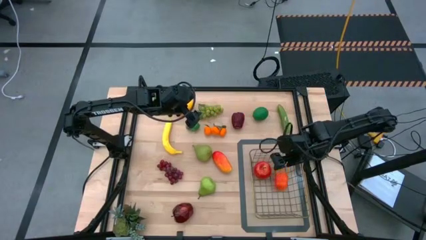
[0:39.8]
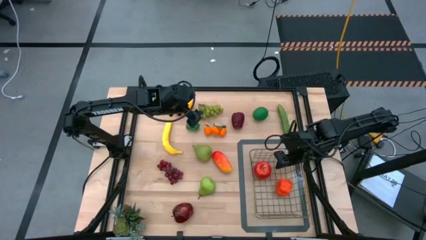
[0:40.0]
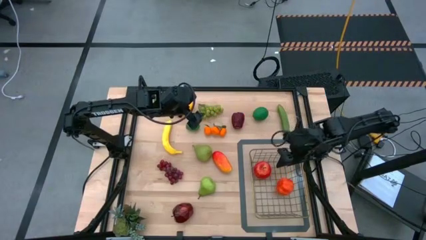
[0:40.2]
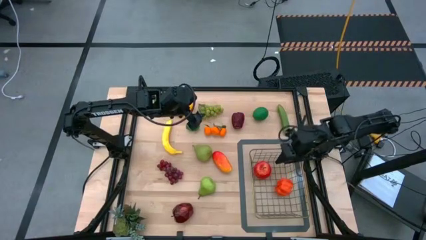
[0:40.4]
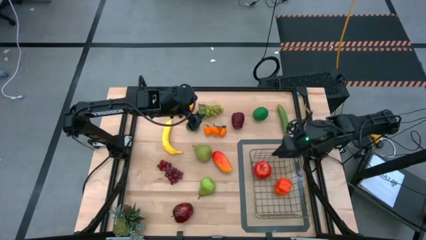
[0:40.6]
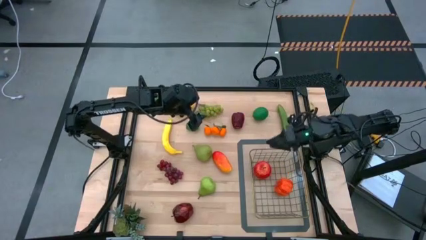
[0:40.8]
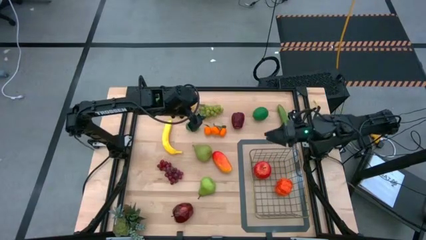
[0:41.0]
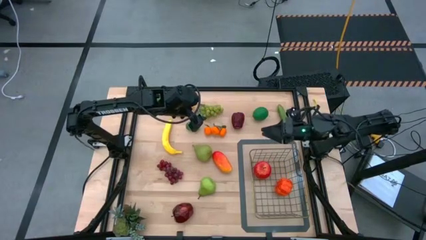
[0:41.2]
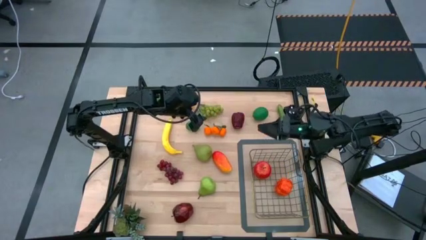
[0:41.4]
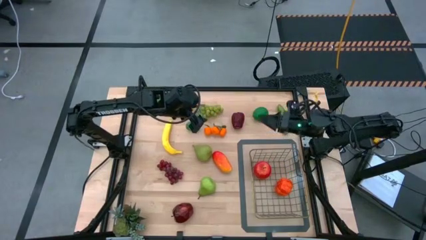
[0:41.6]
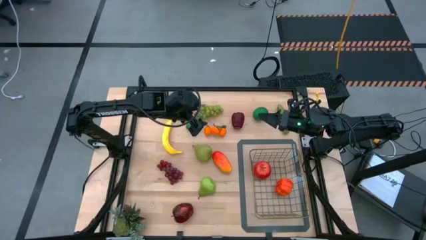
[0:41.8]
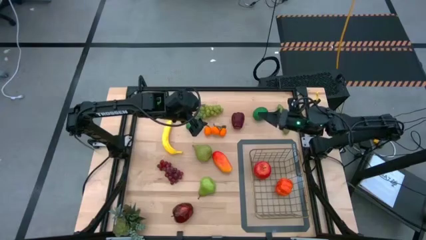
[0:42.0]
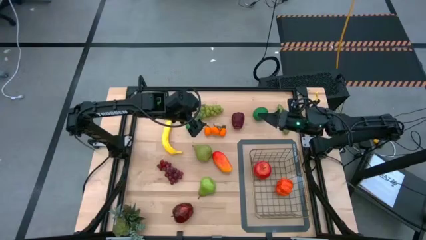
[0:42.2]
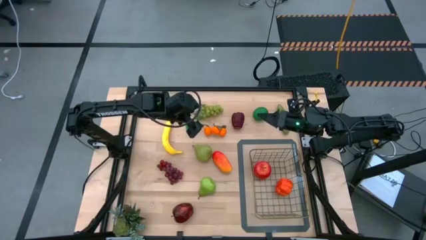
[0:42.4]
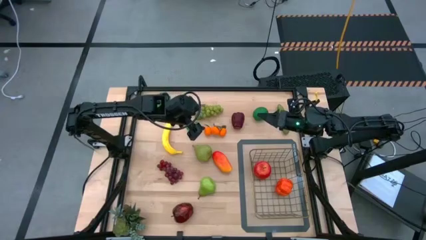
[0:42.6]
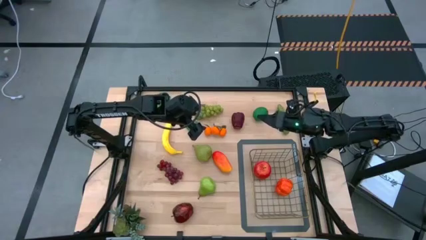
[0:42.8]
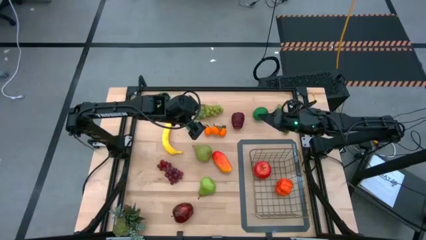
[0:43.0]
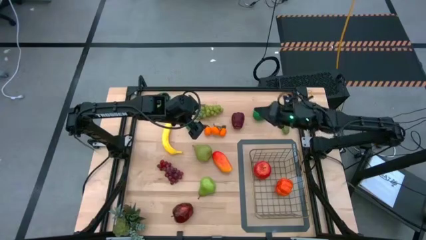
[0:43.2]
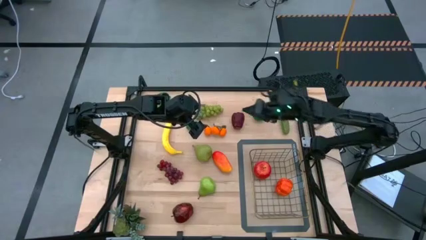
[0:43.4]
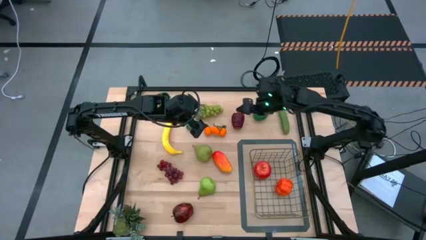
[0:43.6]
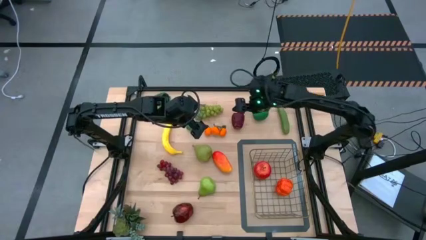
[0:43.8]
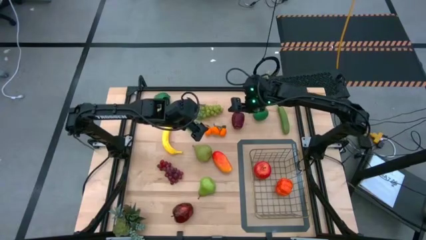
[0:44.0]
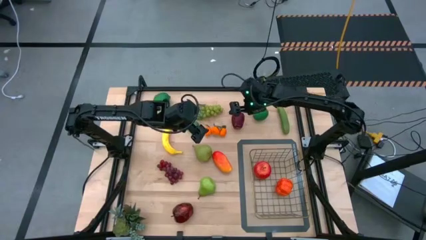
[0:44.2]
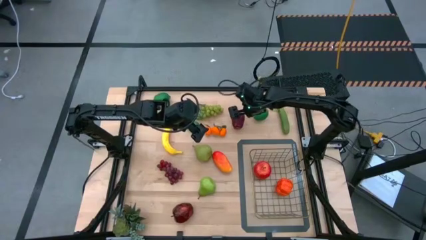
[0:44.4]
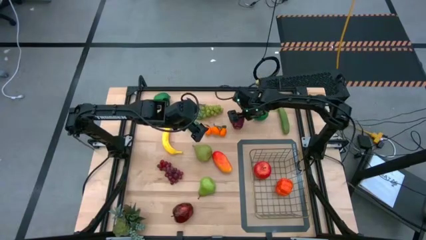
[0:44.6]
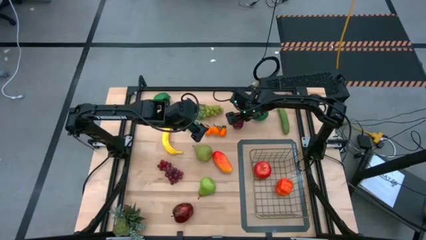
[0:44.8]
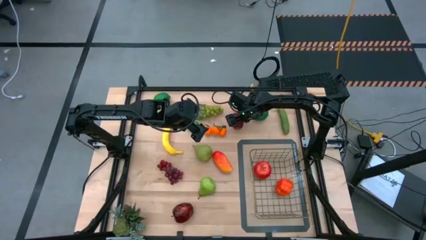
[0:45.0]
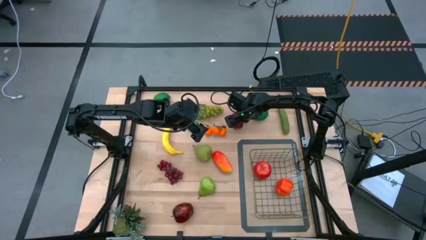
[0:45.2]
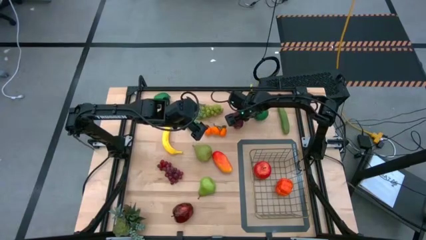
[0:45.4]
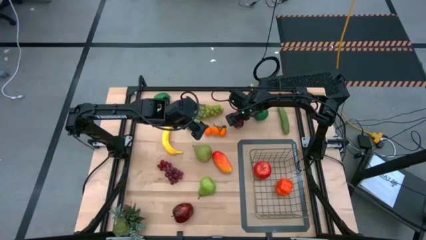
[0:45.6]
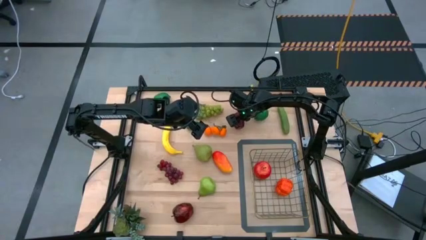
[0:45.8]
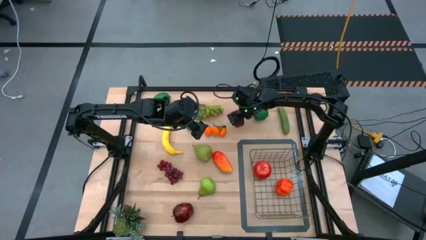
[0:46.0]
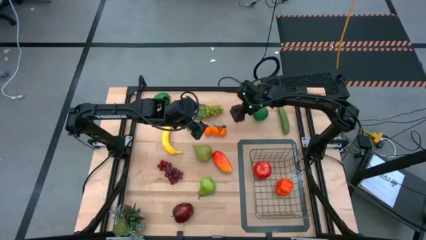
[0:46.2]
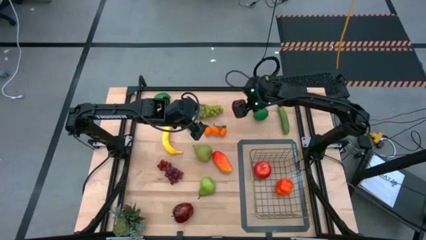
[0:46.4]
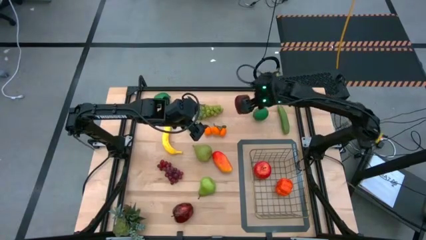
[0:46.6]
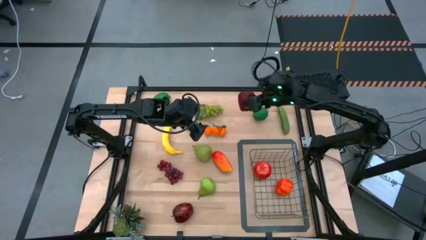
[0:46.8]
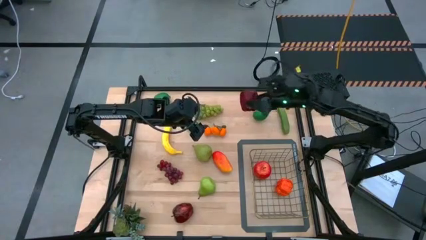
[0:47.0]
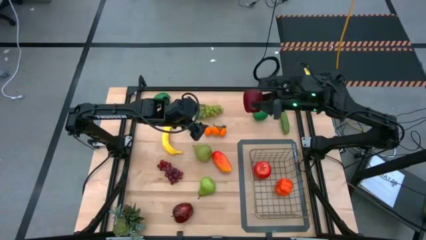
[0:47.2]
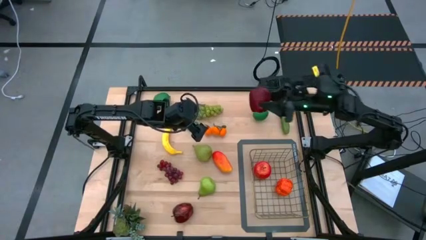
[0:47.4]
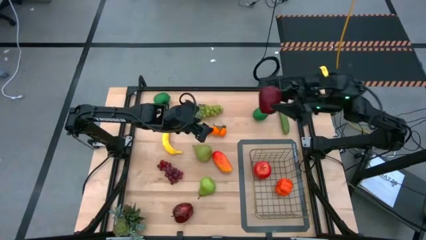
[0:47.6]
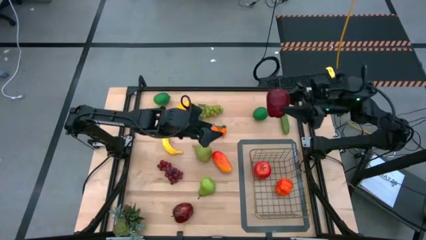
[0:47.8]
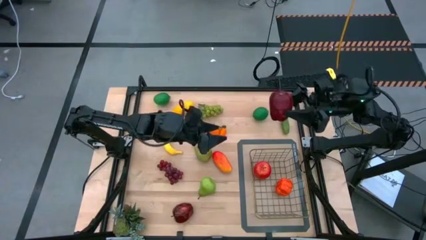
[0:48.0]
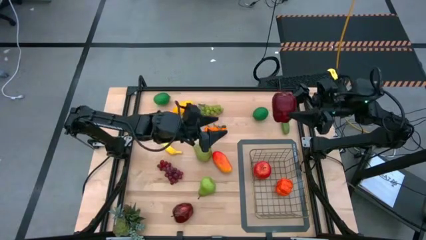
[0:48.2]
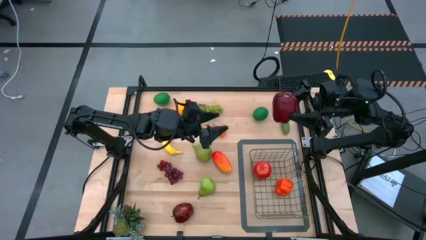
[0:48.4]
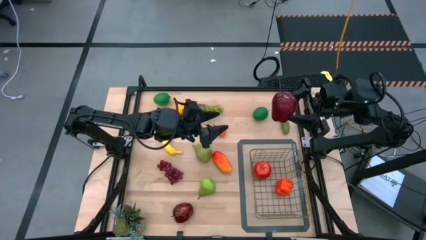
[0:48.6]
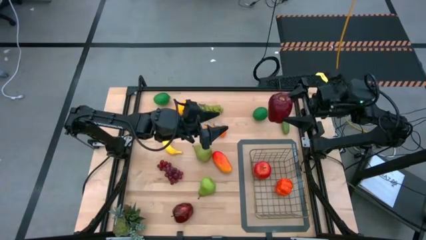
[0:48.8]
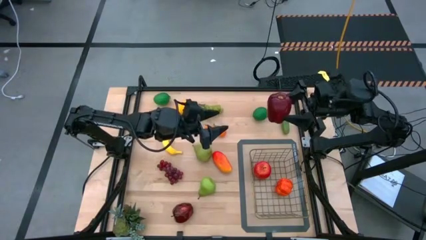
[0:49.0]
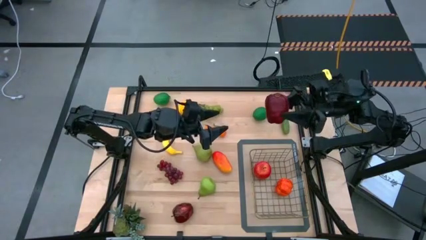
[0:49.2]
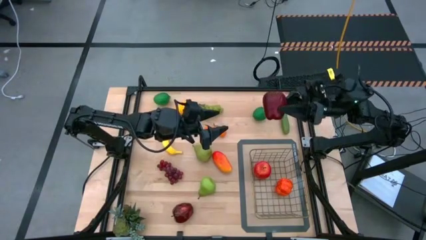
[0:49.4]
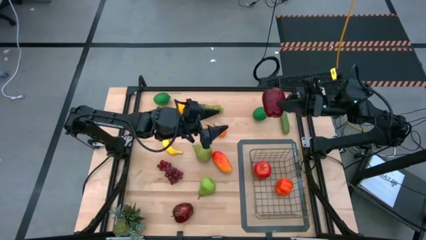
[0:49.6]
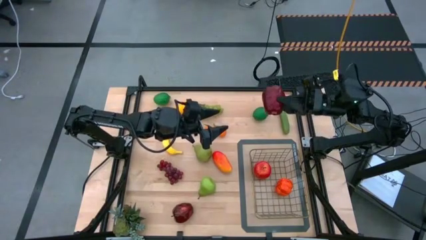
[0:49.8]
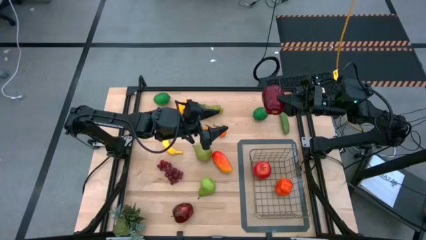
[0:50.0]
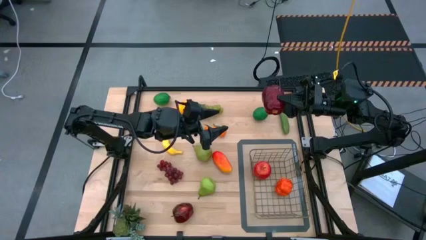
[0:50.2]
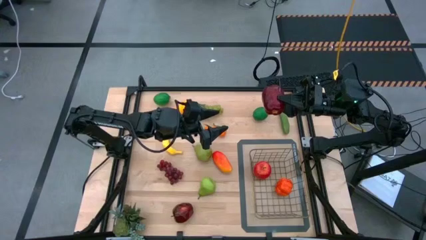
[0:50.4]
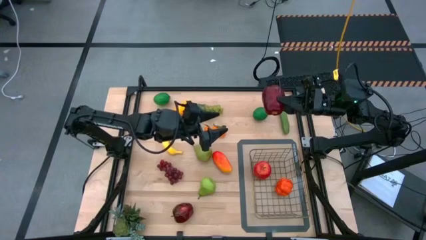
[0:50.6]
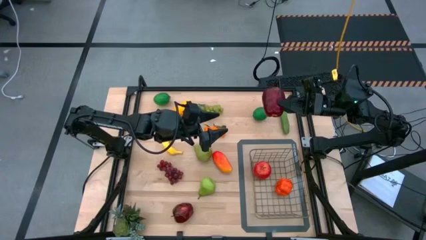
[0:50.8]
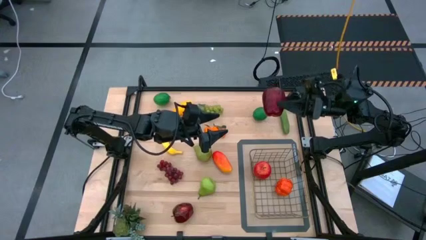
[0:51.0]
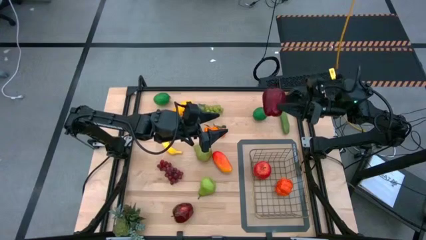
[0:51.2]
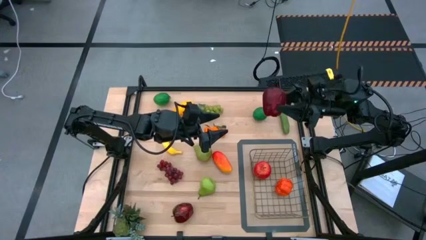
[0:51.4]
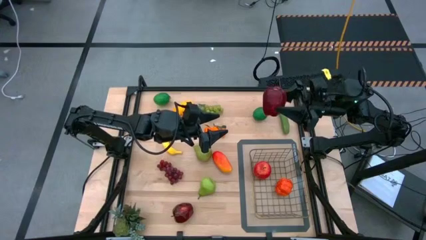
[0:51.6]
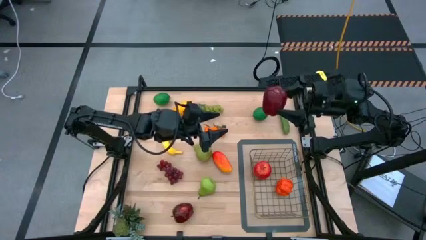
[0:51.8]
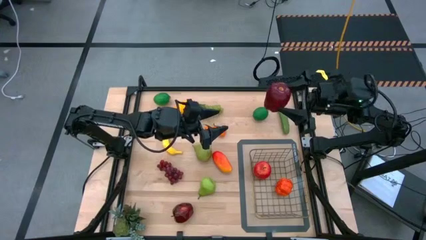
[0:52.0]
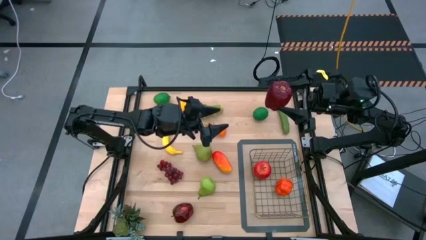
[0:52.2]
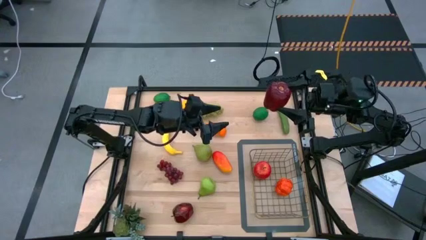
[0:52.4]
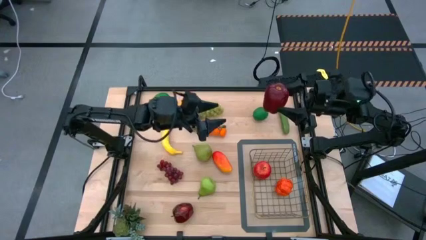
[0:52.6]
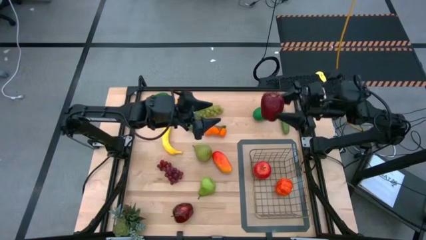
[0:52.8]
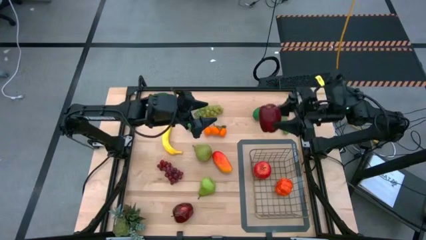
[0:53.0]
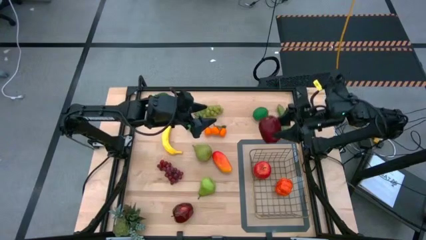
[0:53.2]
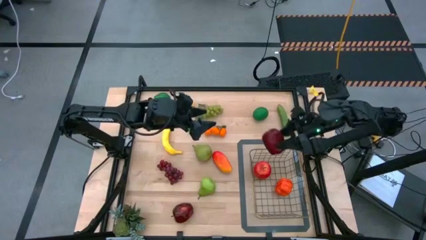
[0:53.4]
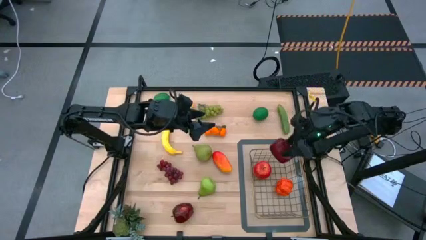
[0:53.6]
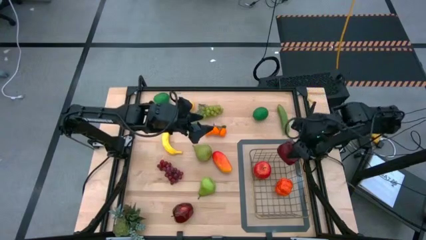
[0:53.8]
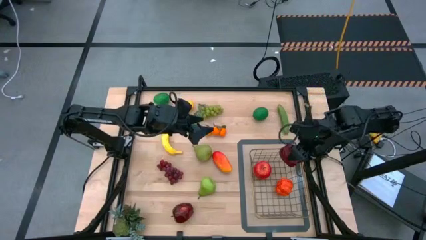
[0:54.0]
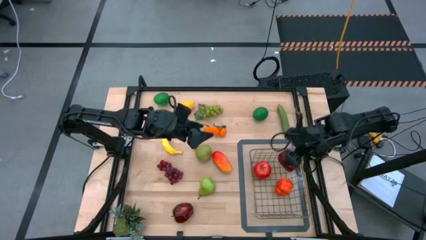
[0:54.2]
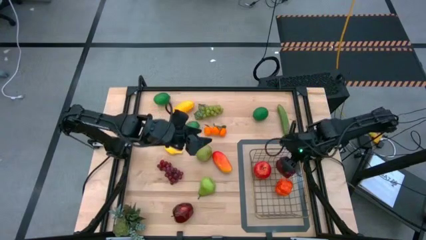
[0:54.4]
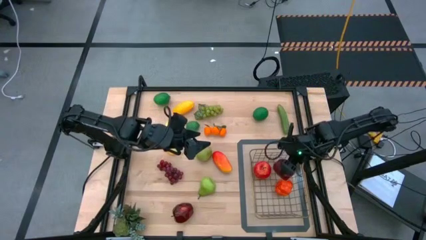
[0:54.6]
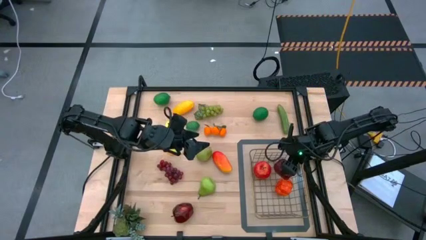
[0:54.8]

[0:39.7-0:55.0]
Task: Build produce basket
Put the top dark red apple into the wire basket
